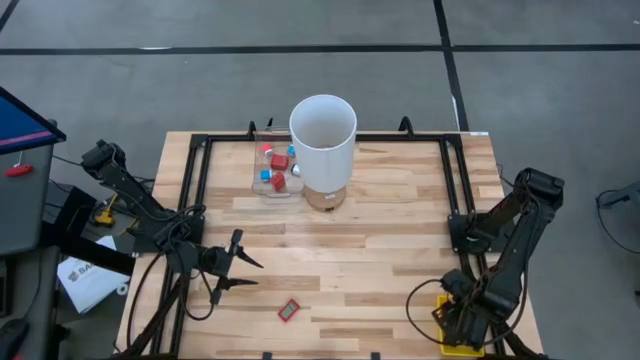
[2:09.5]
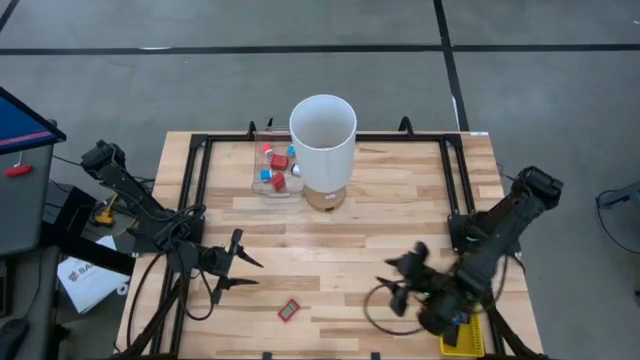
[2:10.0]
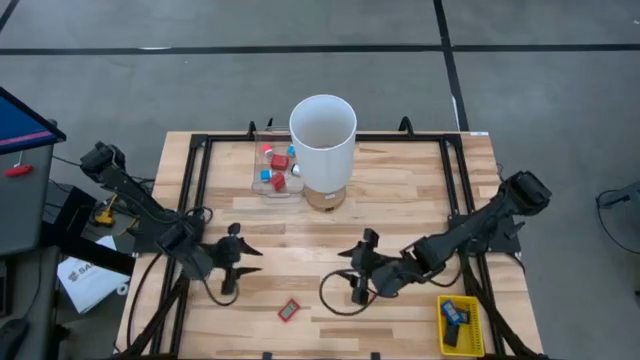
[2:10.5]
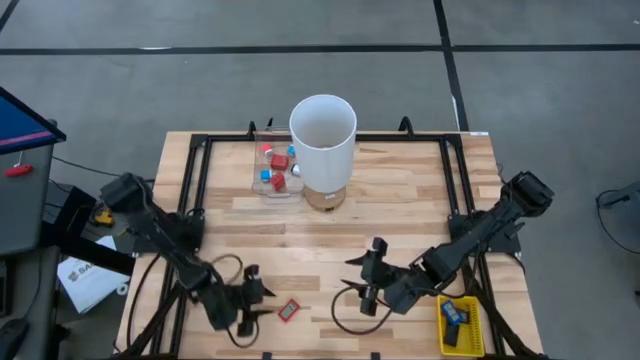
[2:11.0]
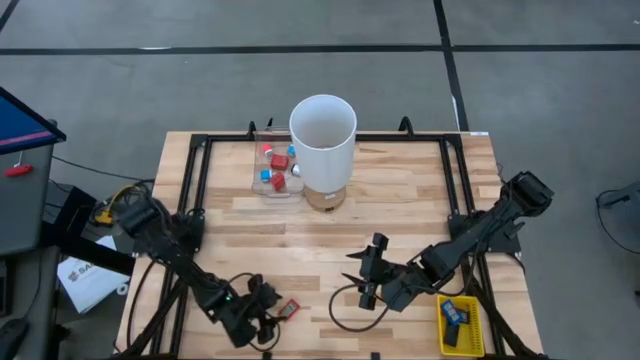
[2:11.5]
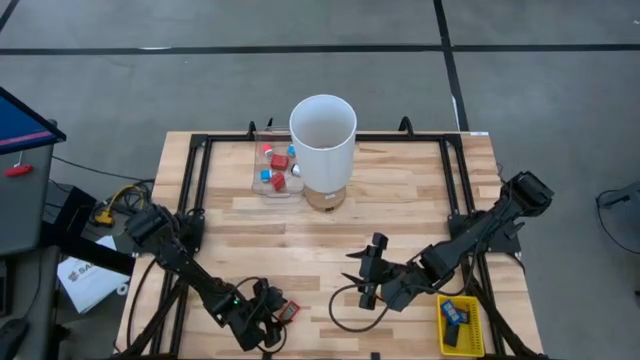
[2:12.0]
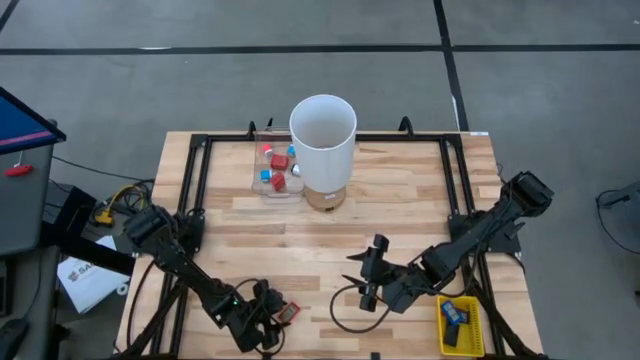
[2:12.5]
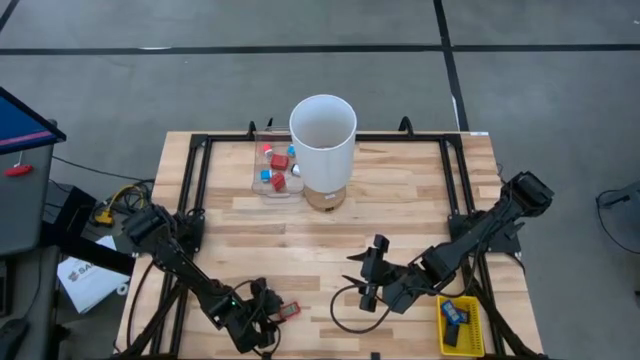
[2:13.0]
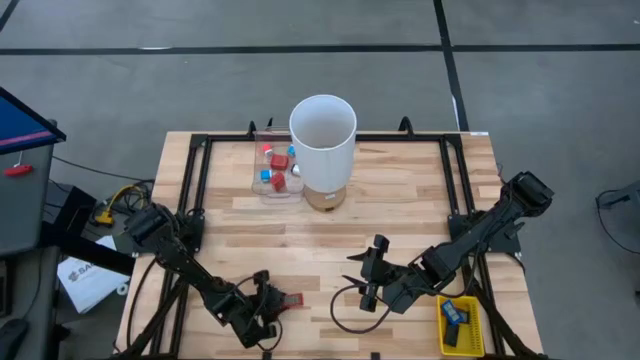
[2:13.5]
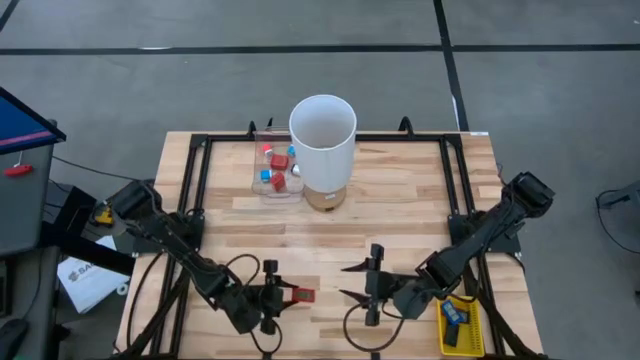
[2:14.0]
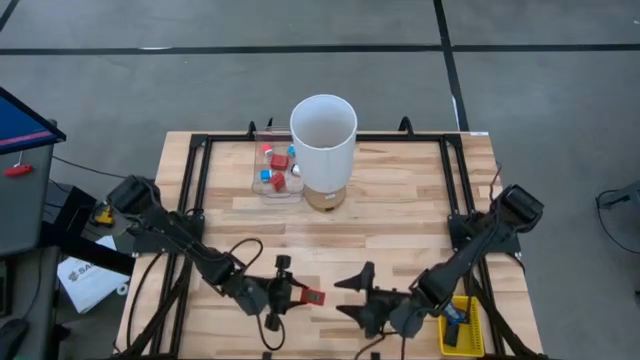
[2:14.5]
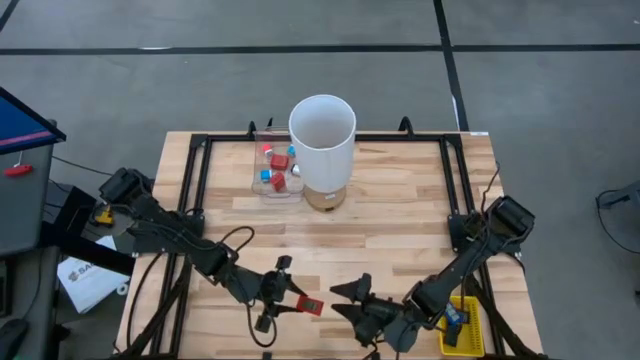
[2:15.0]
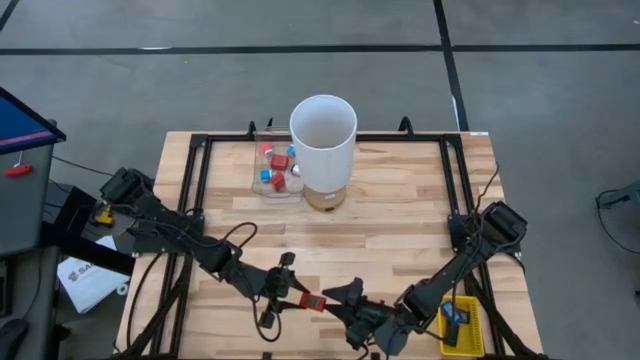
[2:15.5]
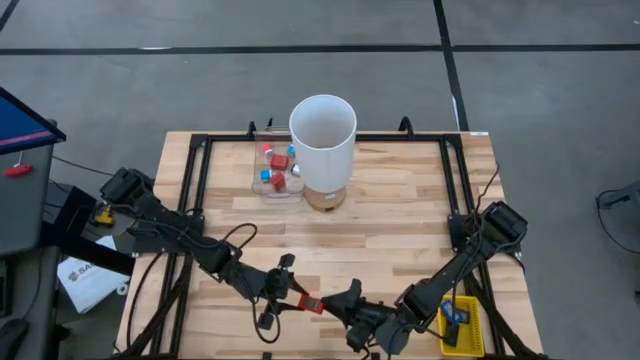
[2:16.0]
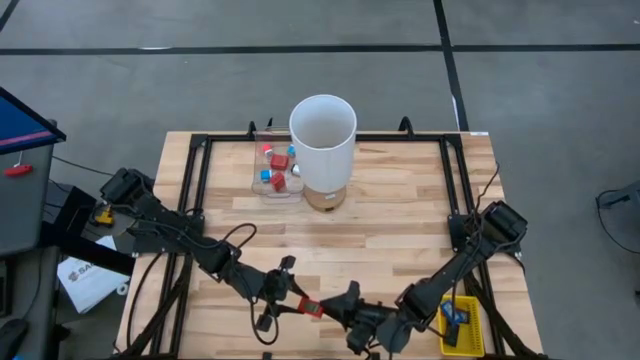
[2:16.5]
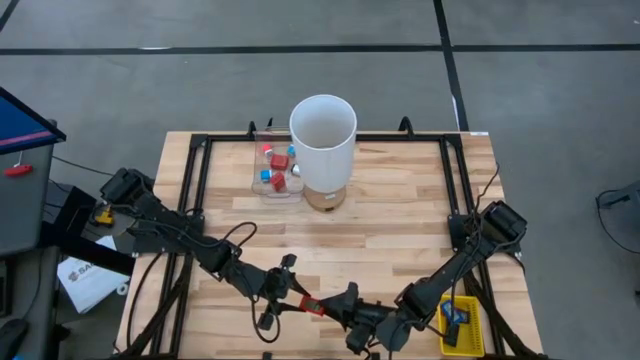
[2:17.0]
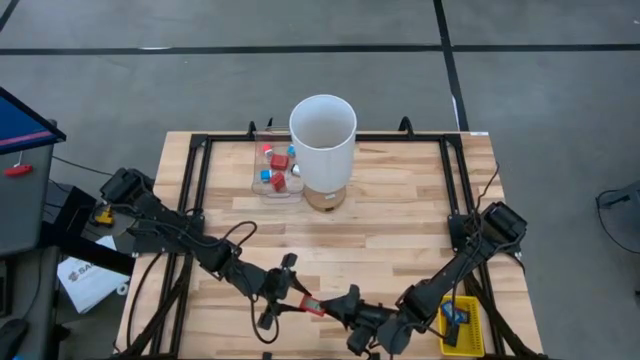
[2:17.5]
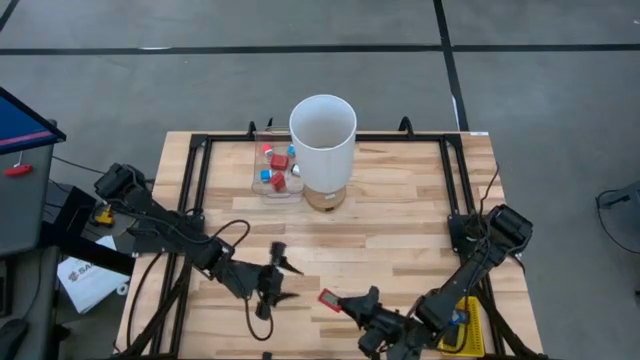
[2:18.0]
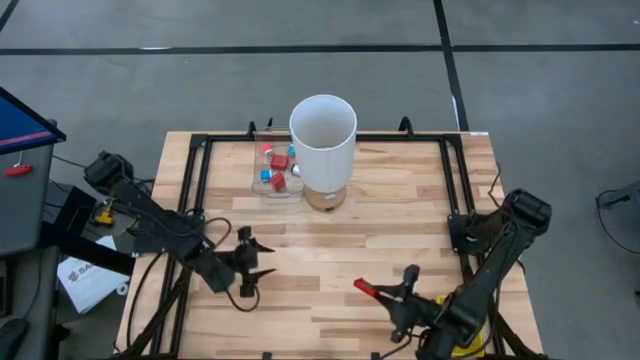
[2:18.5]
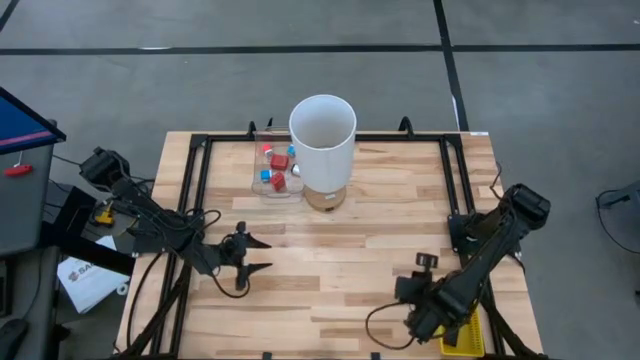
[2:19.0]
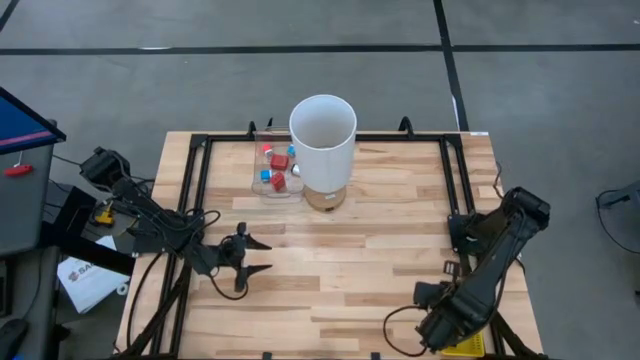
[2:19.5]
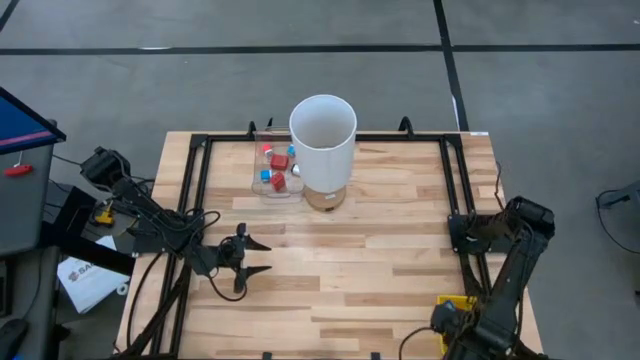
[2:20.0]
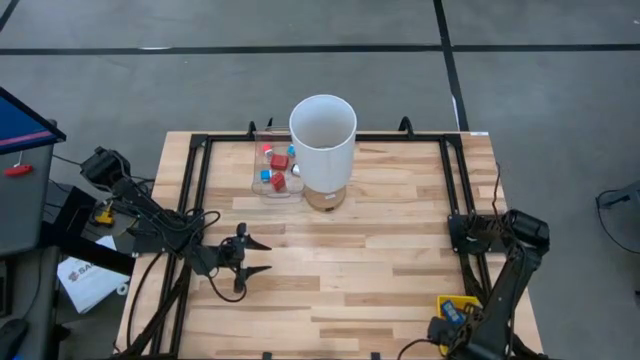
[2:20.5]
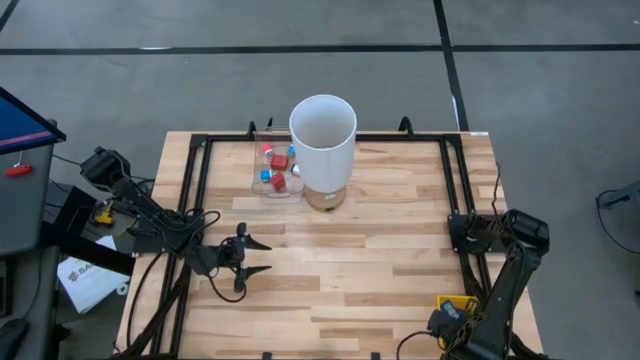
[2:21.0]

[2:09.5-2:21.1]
Task: Pick & Place Office items
Put the red digital timer into the yellow basket

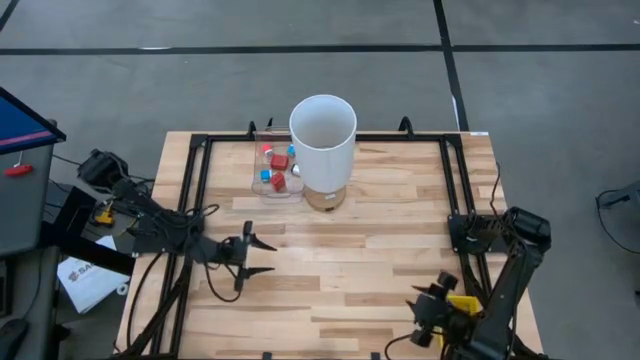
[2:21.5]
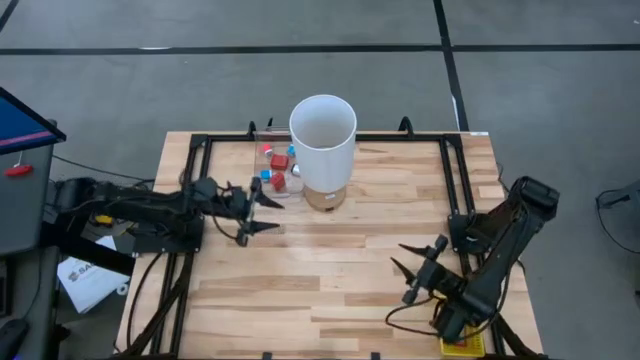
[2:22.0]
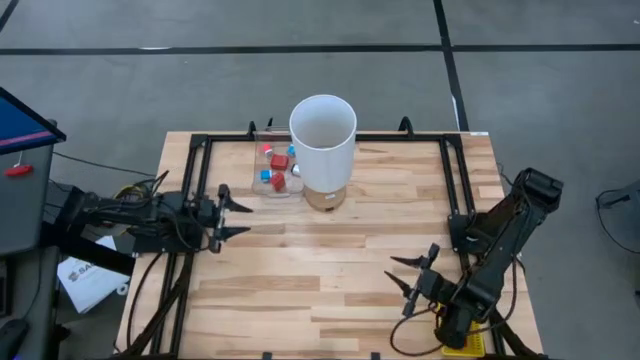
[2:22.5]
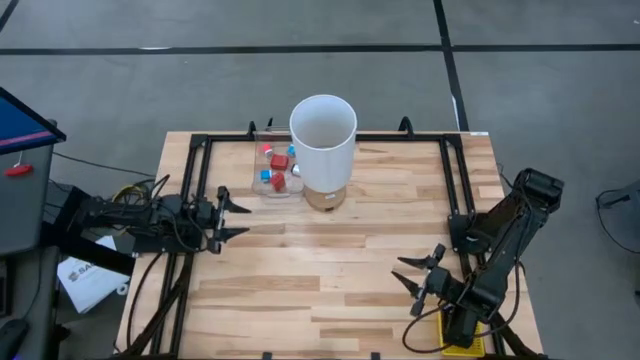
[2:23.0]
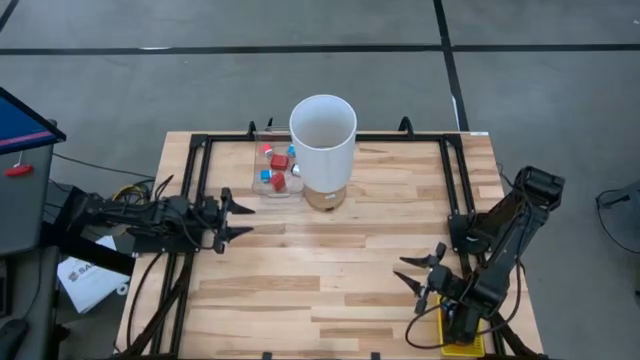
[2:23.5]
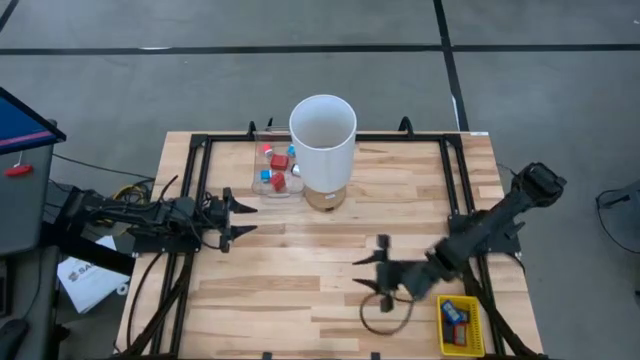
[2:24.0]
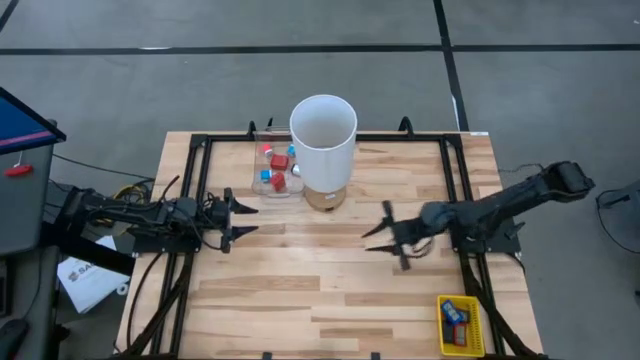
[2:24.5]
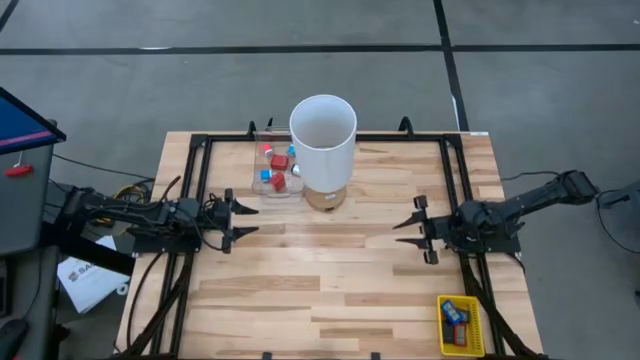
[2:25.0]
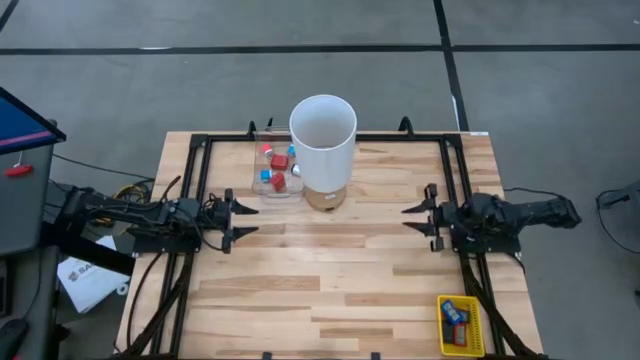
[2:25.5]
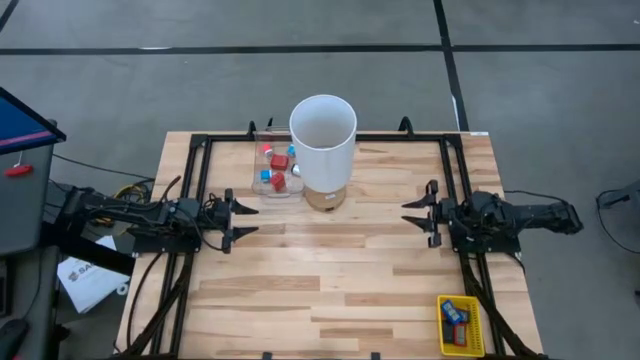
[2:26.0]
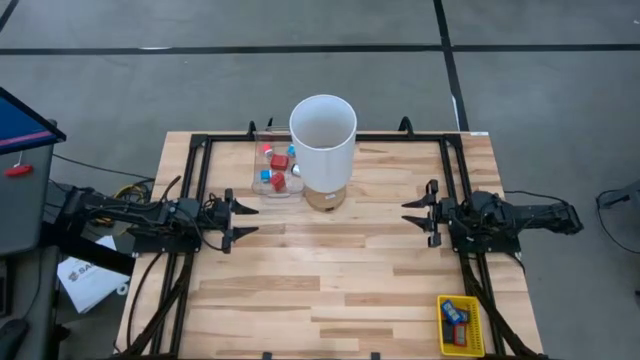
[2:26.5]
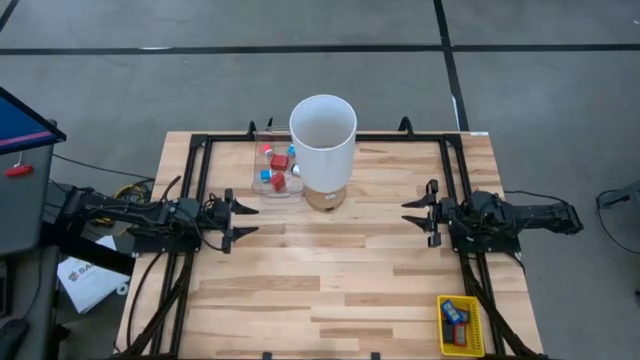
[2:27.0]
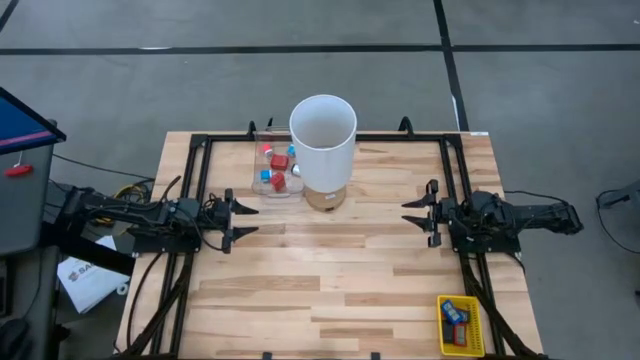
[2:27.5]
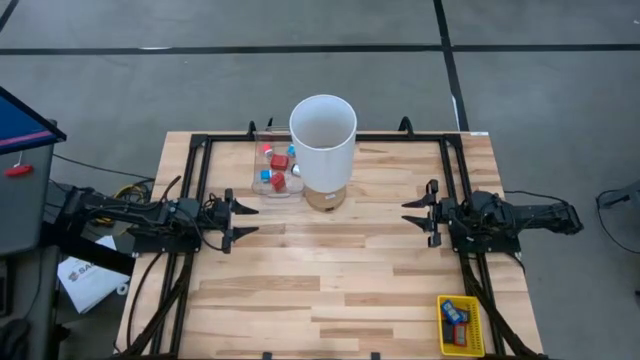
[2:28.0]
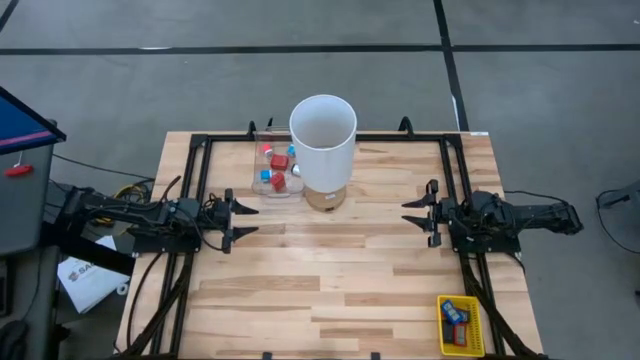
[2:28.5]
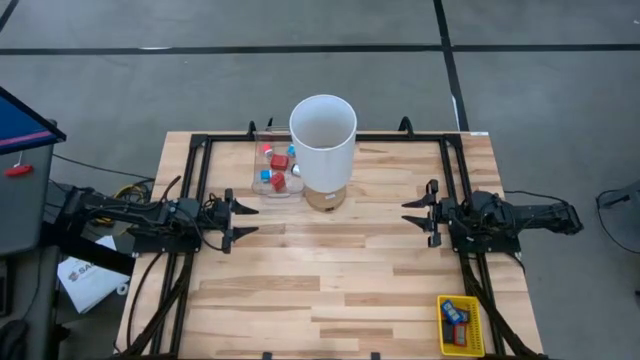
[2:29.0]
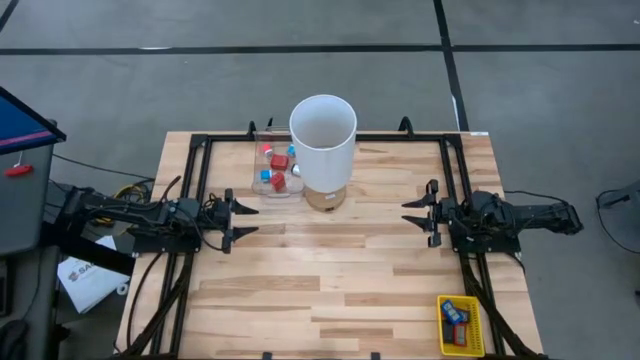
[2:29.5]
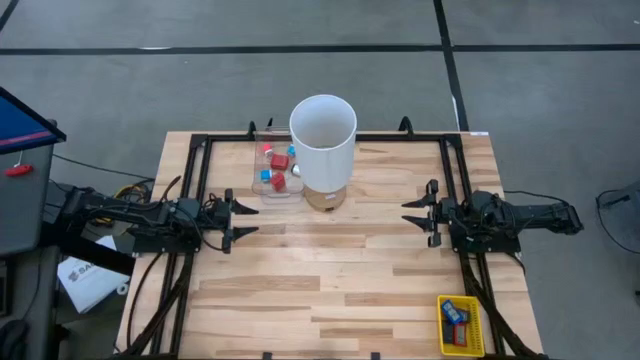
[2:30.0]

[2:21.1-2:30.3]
Return to Home Position

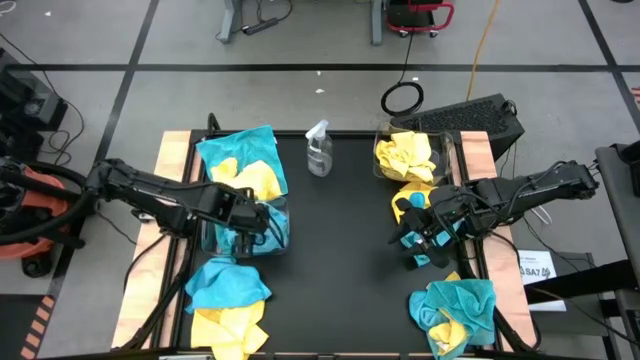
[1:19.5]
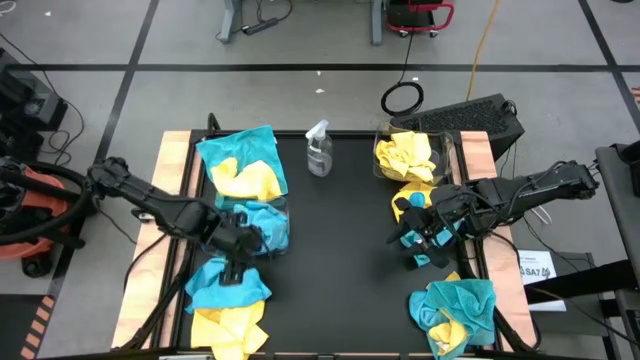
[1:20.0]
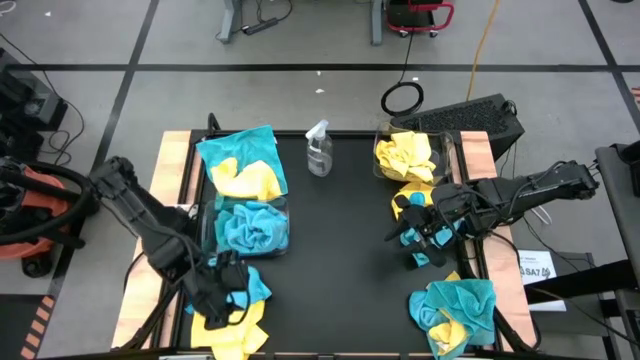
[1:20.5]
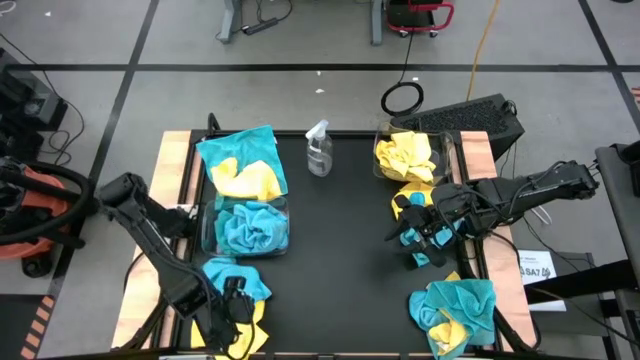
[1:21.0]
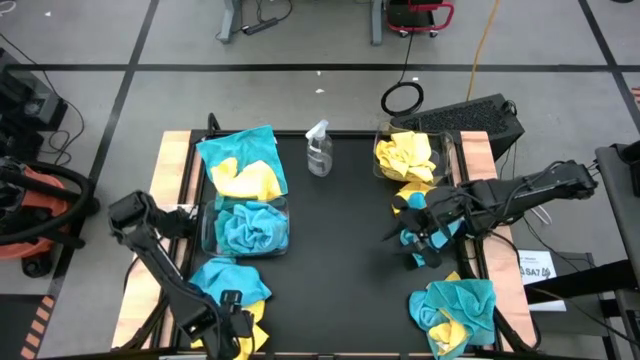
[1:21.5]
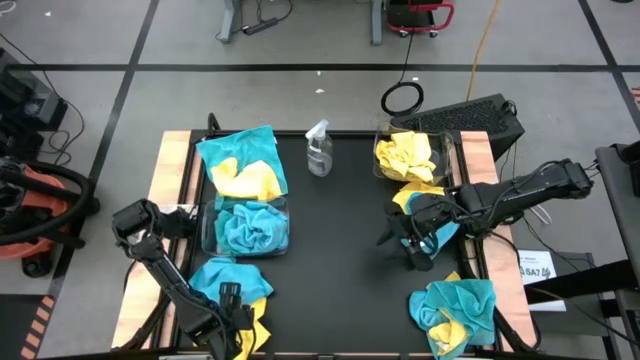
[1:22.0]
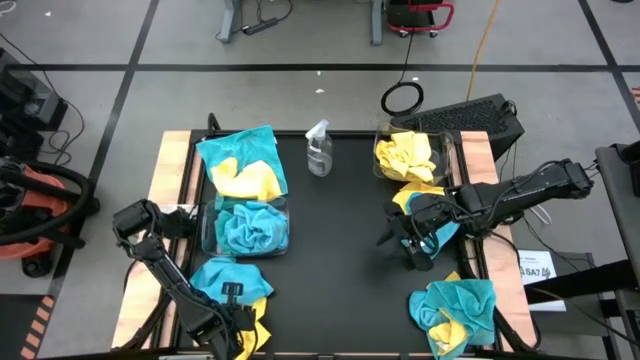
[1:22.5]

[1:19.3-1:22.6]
Task: Sort microfiber towel by color & place in baskets
Put the yellow towel into the top transparent bin
